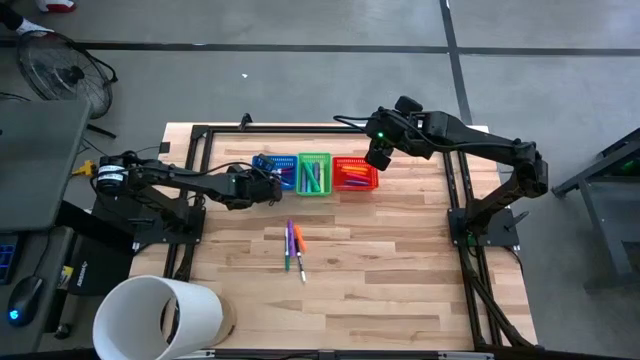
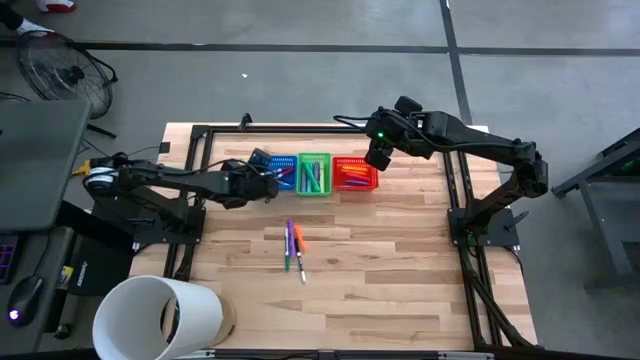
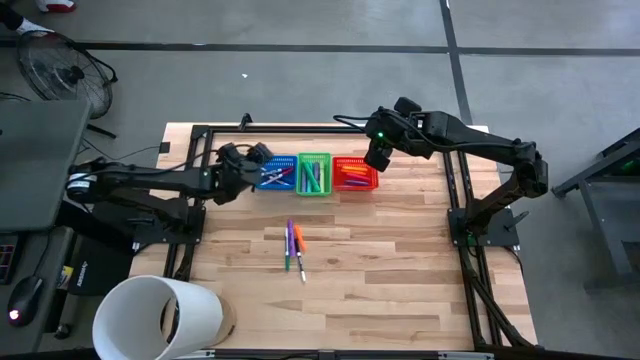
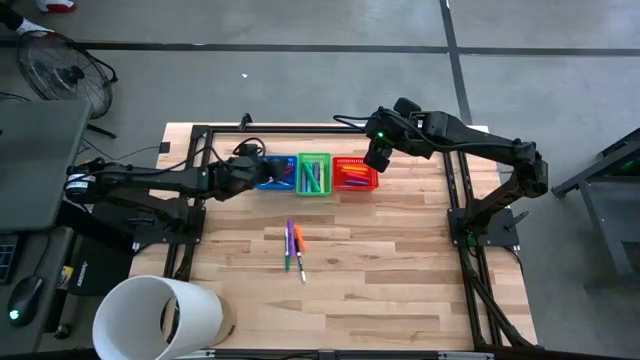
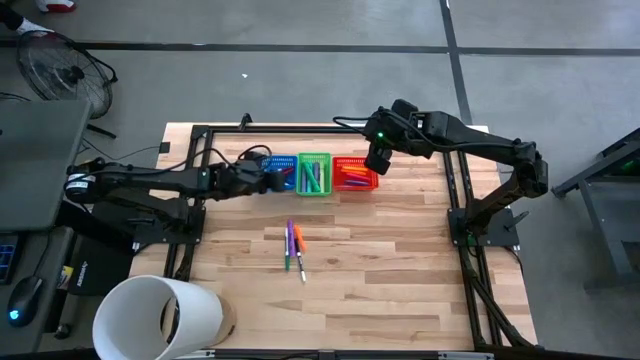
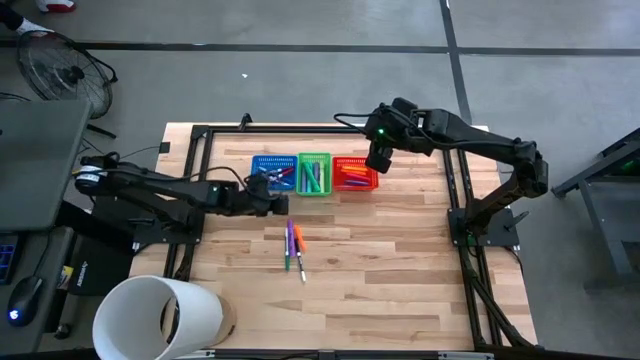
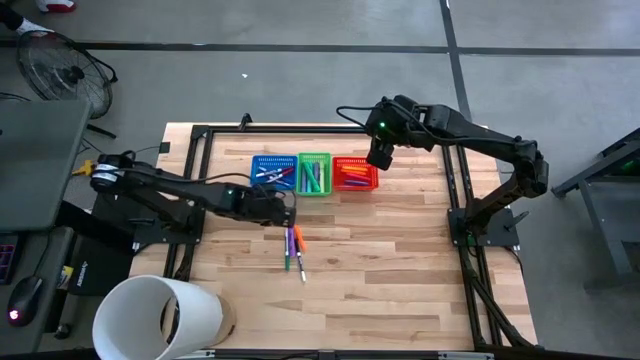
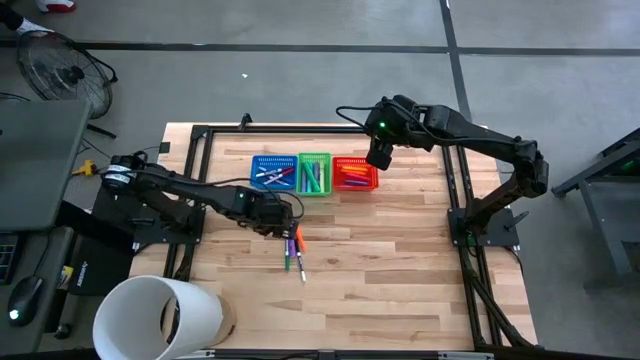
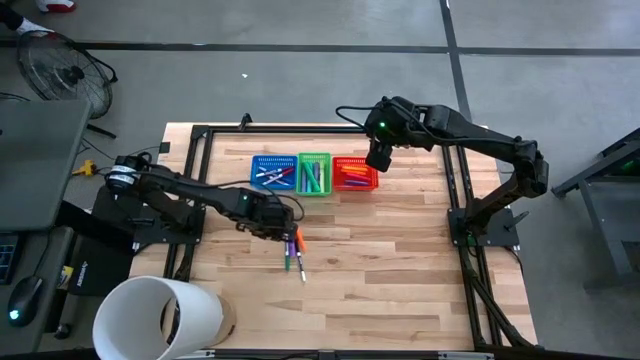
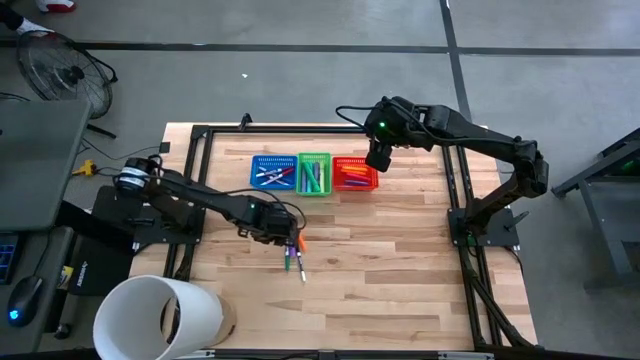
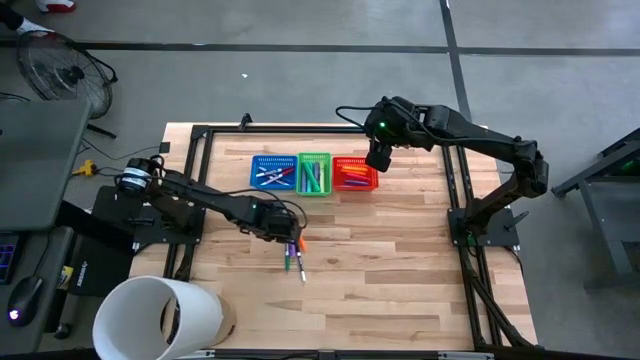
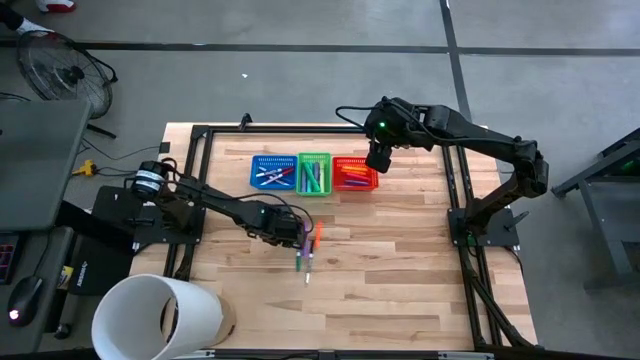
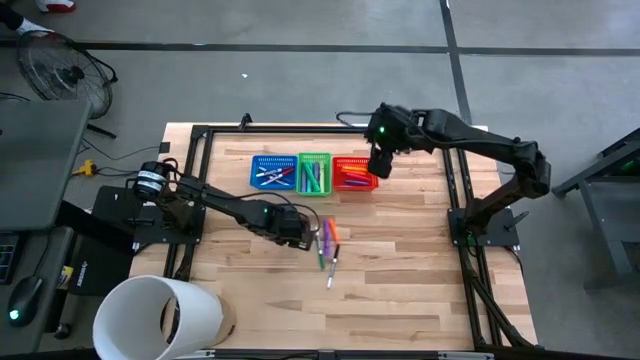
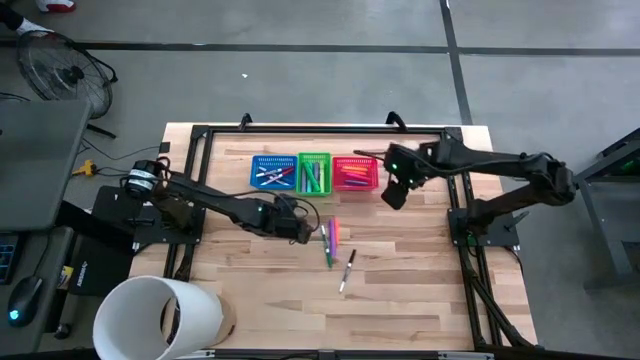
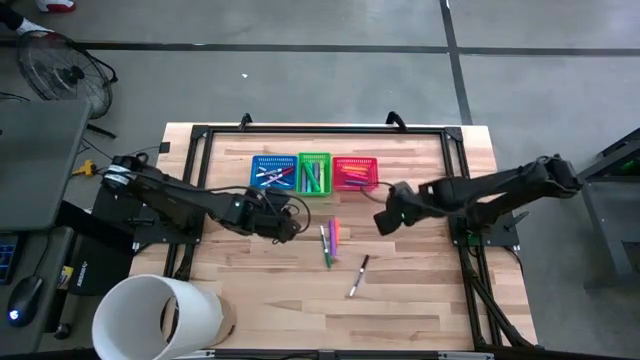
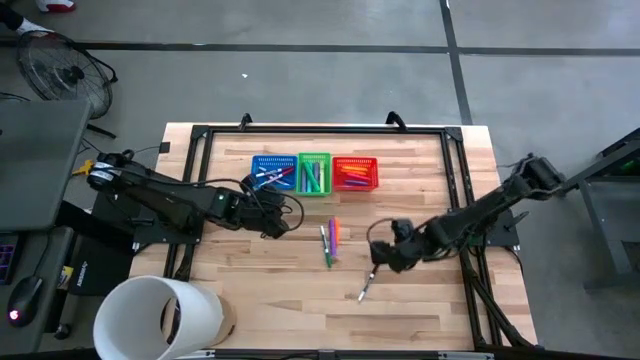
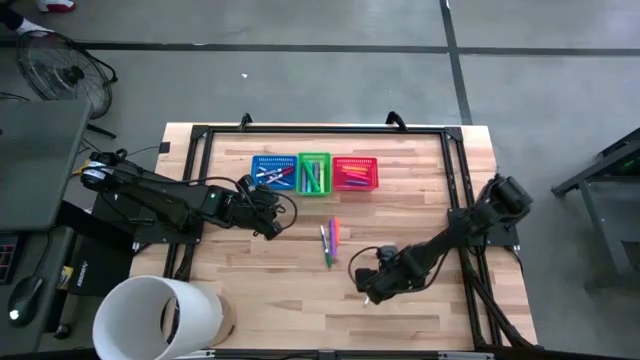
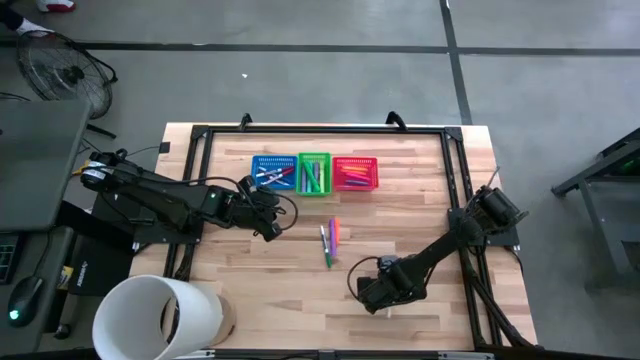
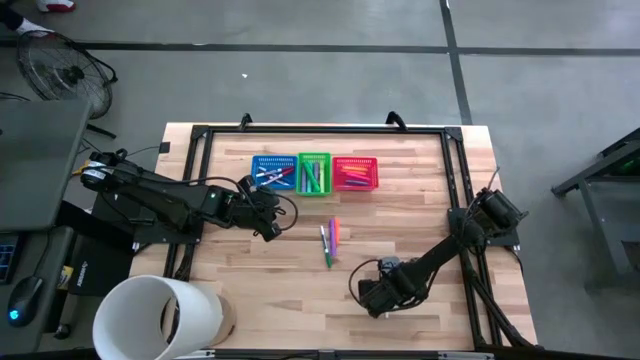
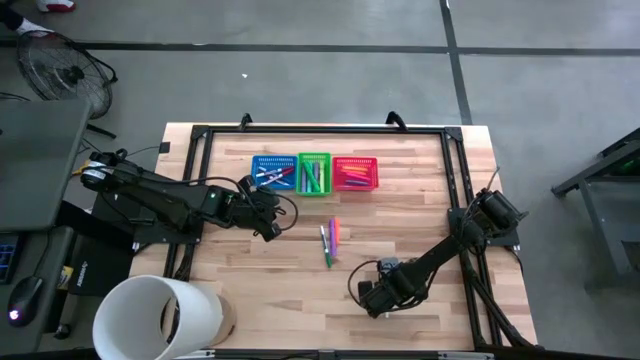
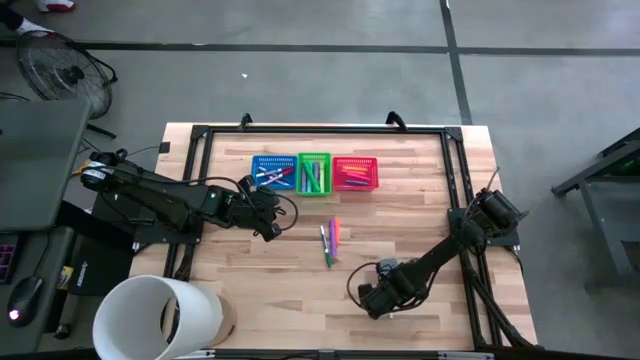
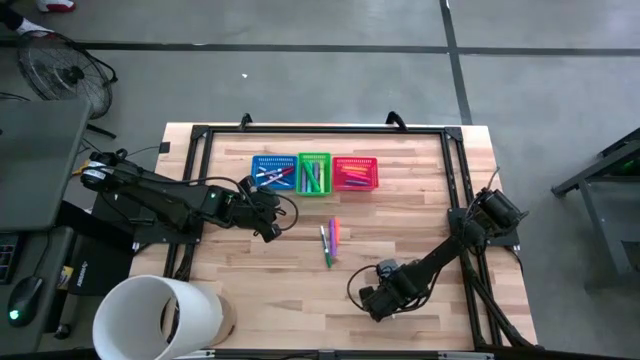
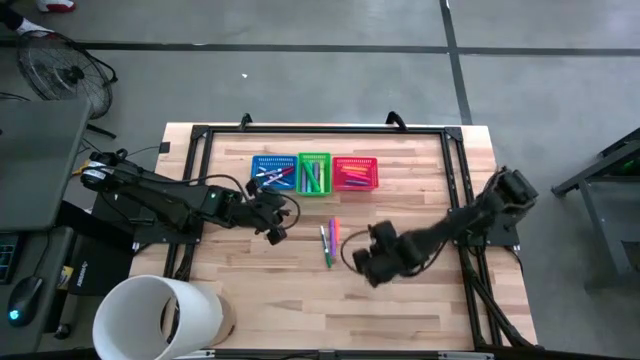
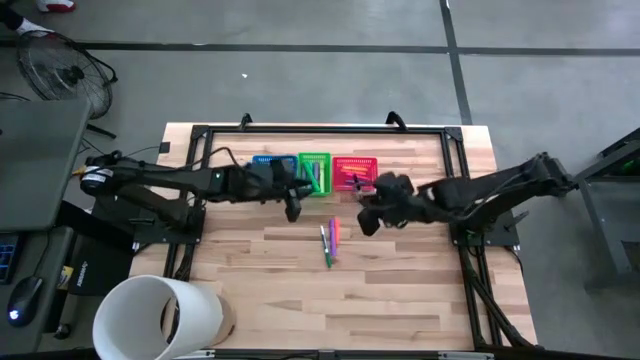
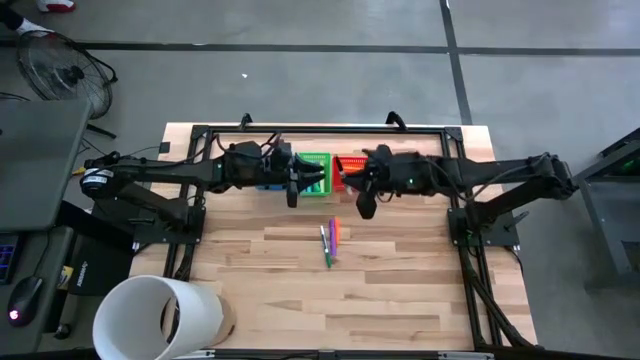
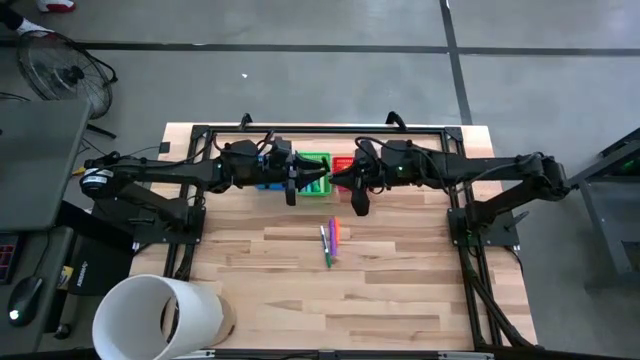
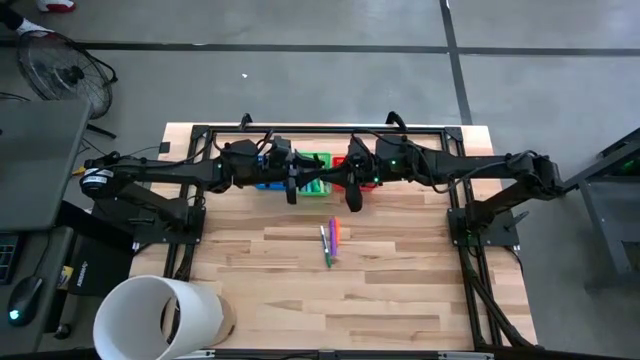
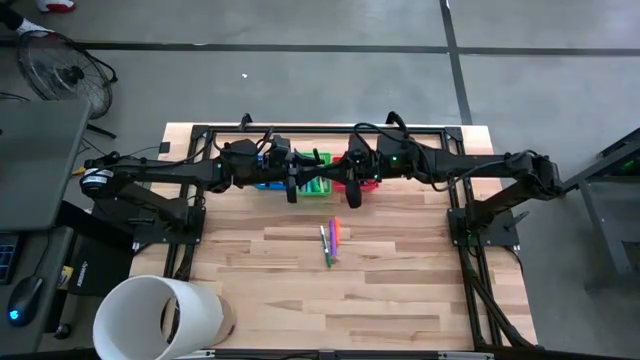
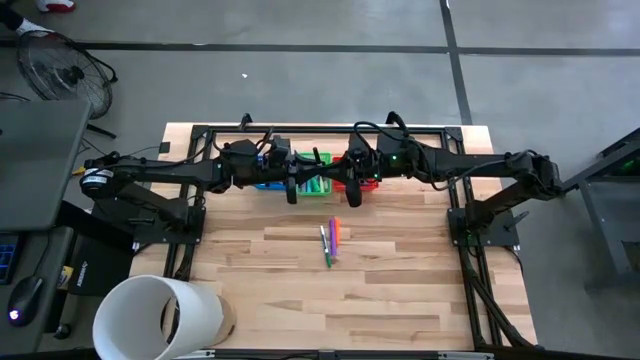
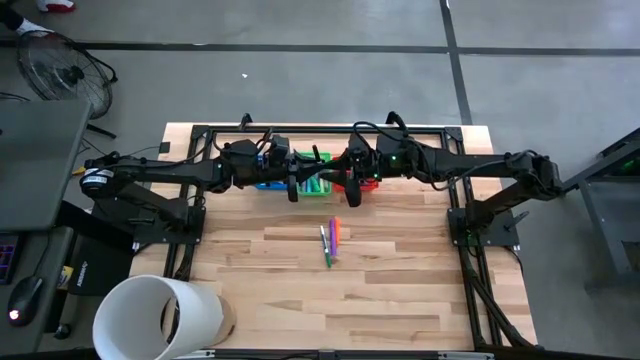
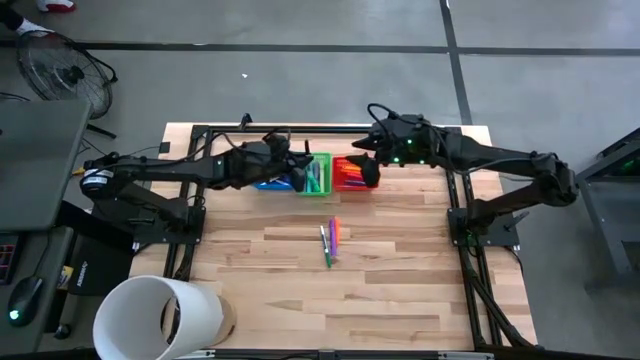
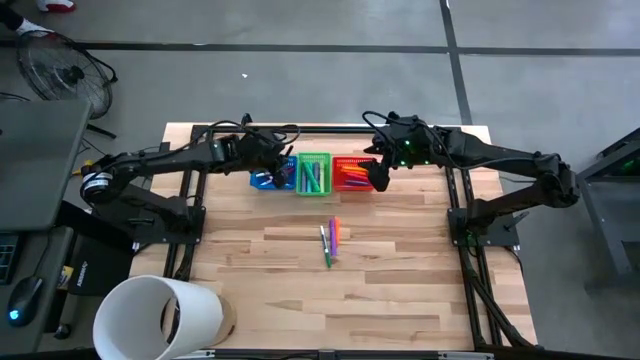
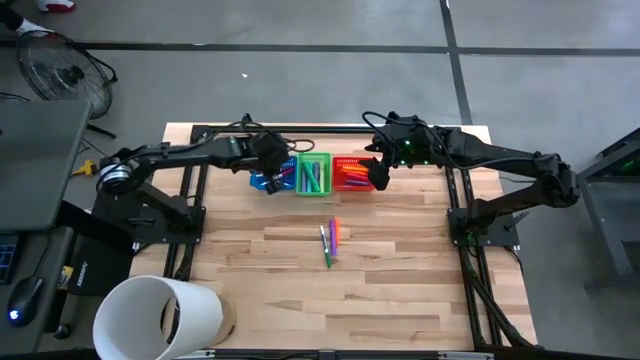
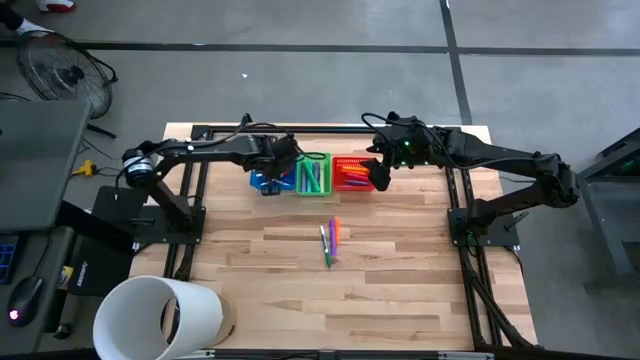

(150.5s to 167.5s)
Task: Pick & Place Markers
Put the black marker into the blue bin

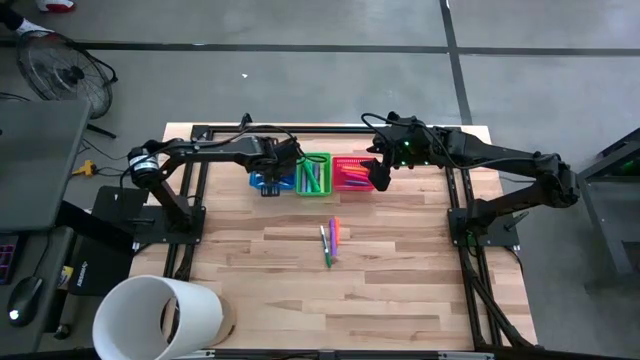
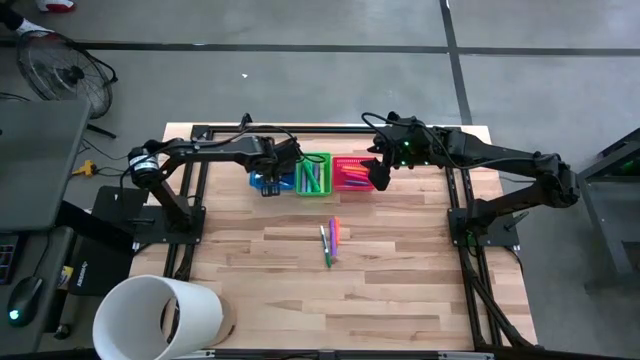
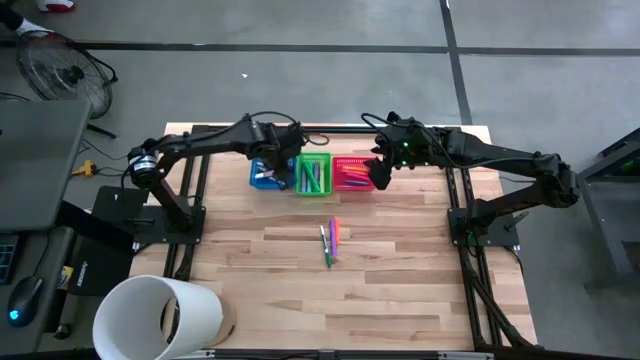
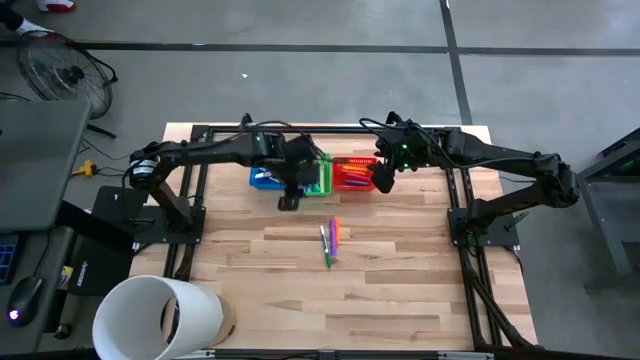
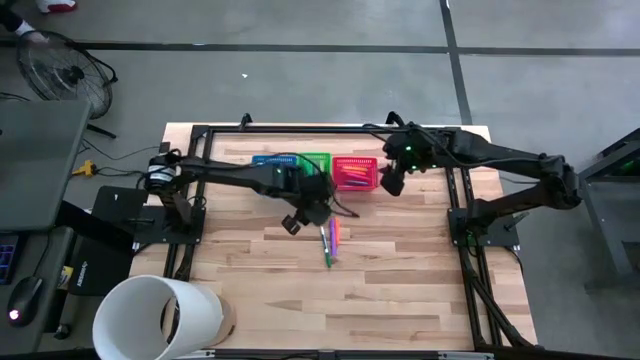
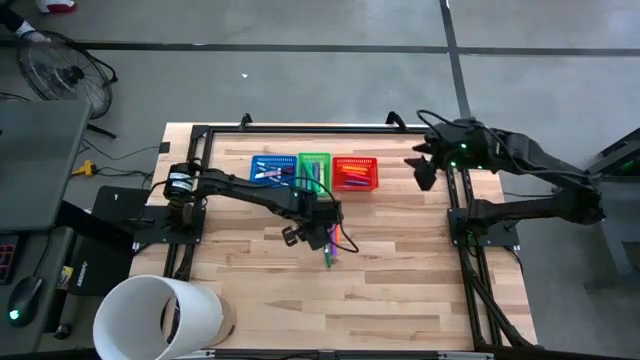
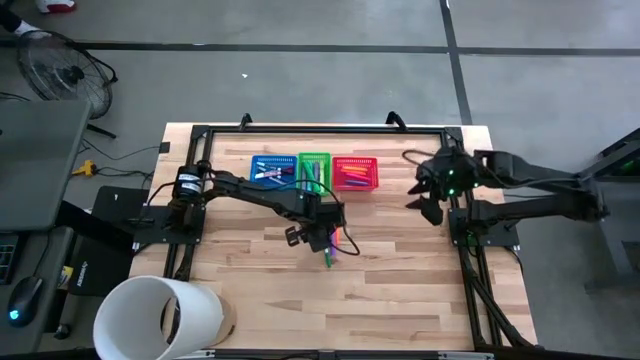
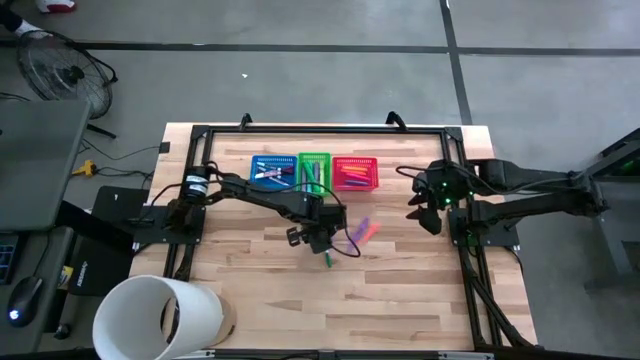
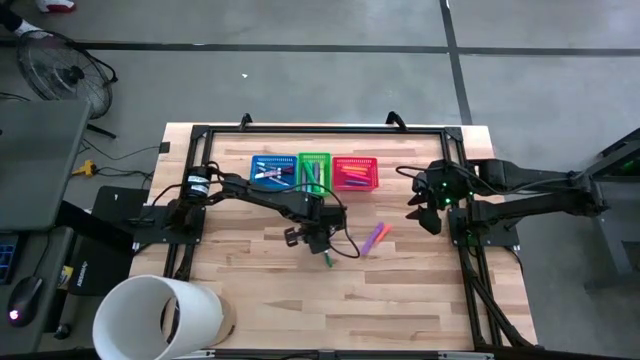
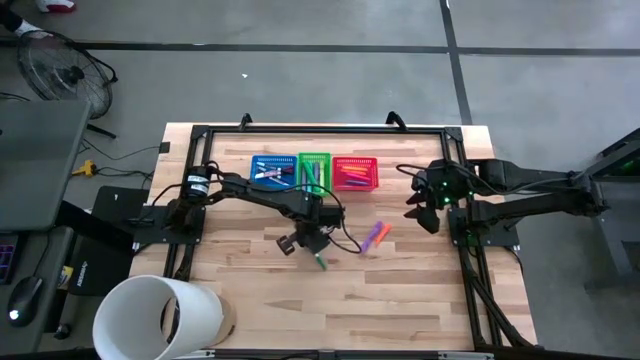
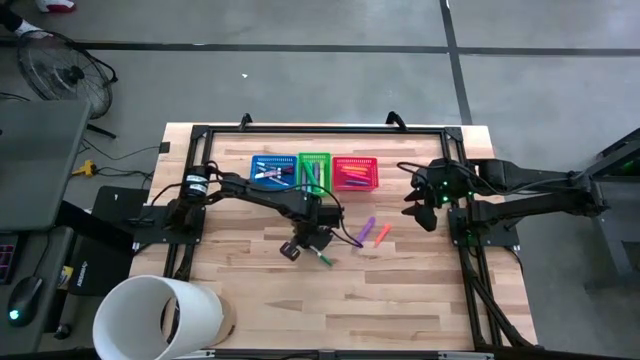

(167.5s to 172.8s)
Put the green marker into the blue bin
